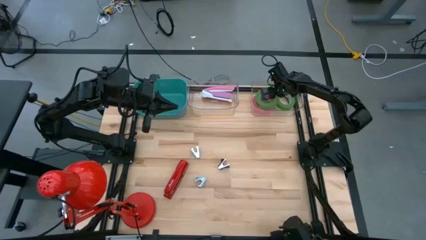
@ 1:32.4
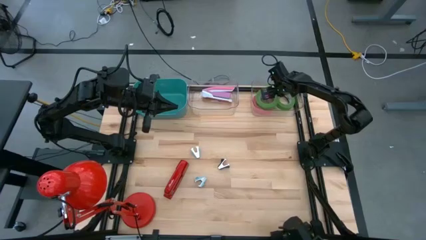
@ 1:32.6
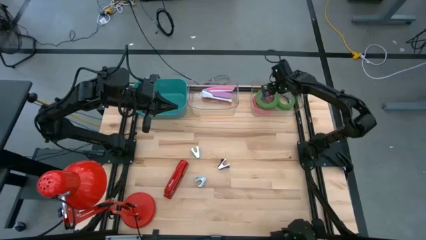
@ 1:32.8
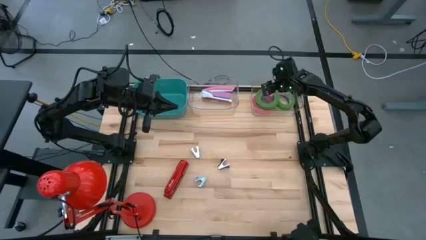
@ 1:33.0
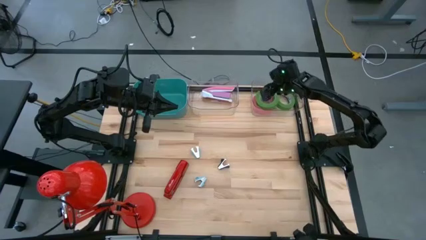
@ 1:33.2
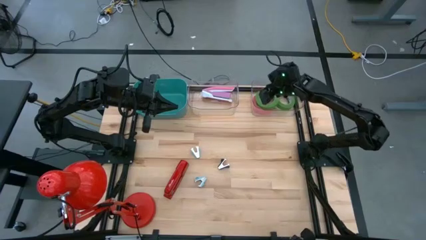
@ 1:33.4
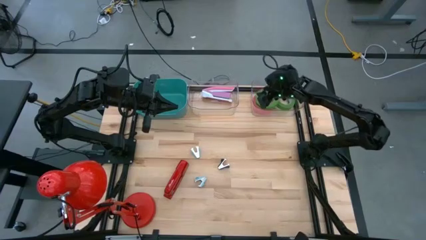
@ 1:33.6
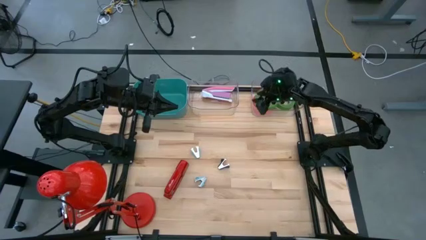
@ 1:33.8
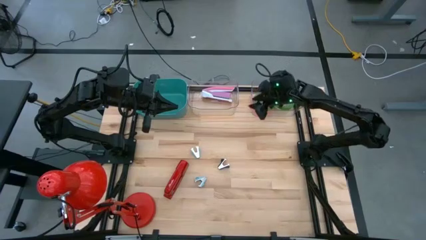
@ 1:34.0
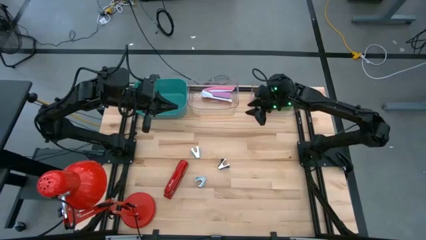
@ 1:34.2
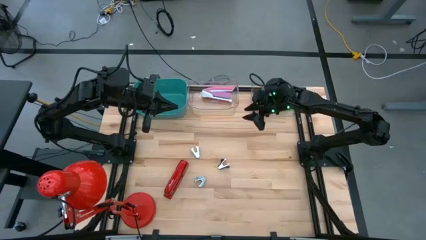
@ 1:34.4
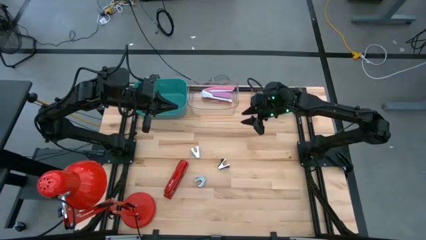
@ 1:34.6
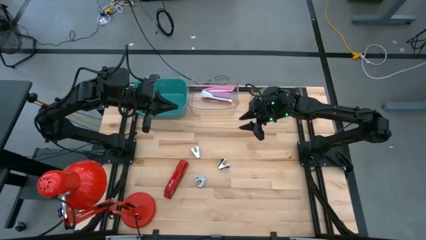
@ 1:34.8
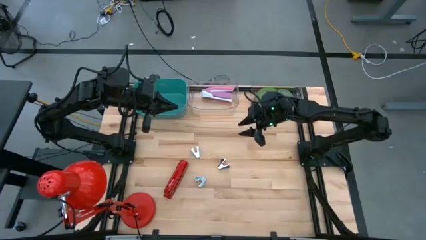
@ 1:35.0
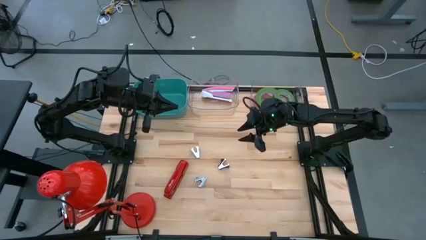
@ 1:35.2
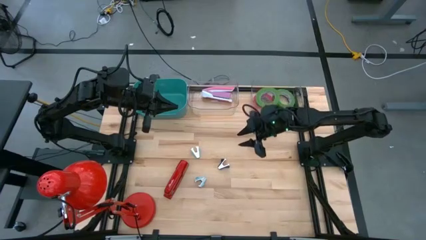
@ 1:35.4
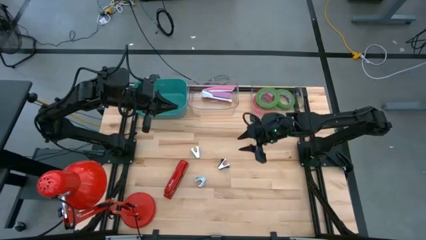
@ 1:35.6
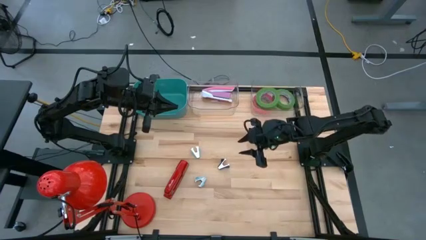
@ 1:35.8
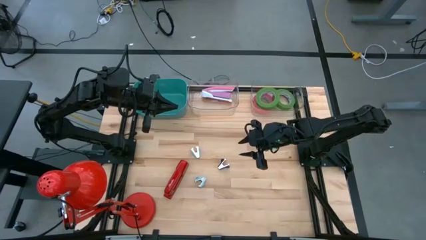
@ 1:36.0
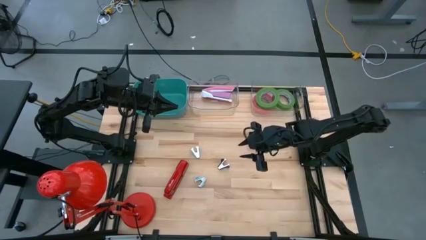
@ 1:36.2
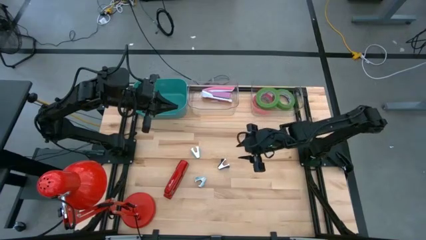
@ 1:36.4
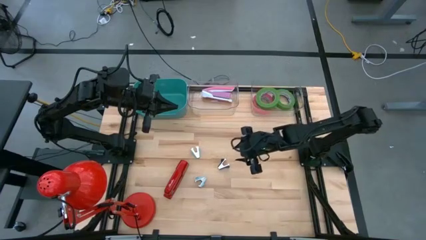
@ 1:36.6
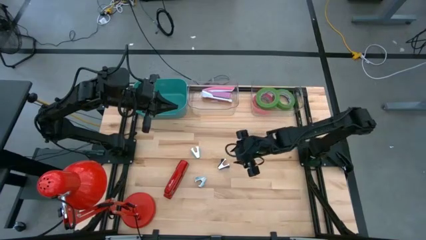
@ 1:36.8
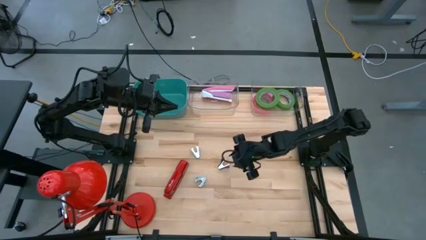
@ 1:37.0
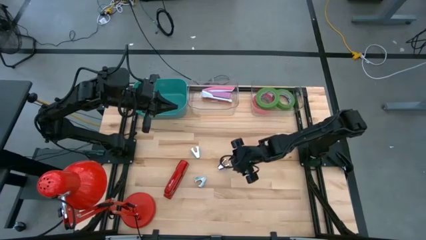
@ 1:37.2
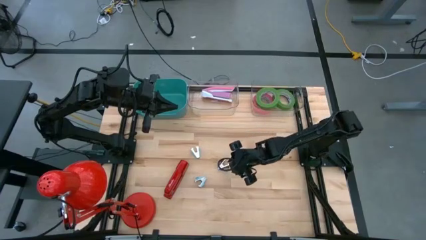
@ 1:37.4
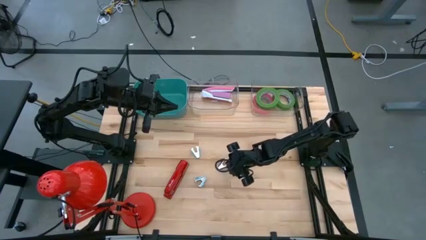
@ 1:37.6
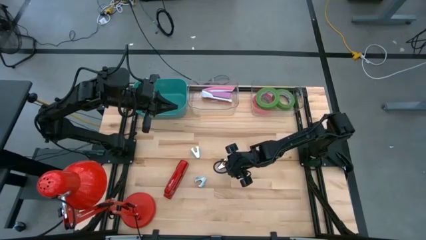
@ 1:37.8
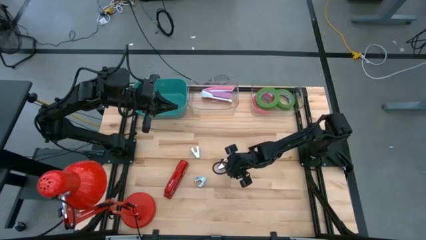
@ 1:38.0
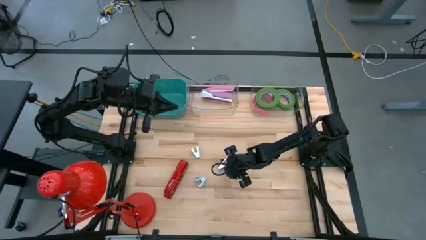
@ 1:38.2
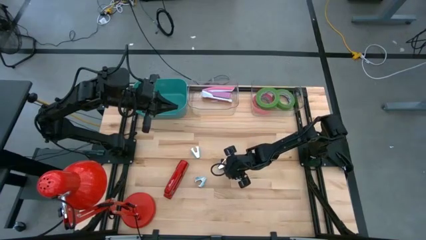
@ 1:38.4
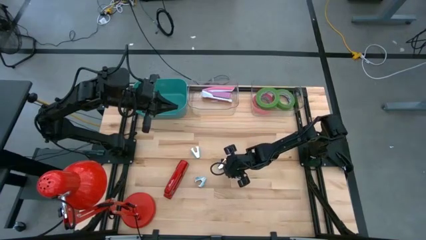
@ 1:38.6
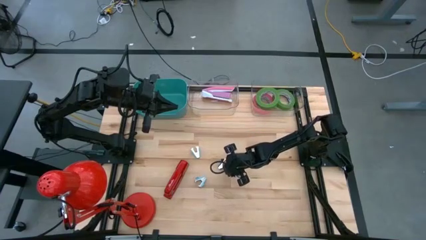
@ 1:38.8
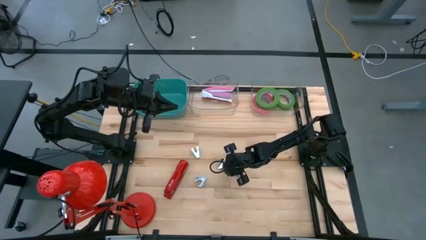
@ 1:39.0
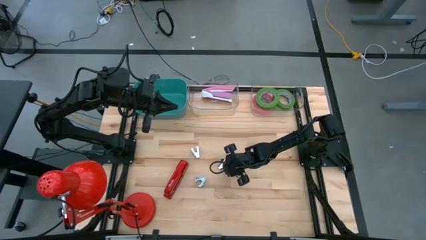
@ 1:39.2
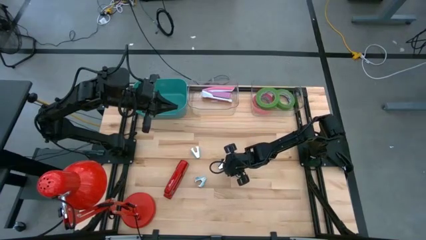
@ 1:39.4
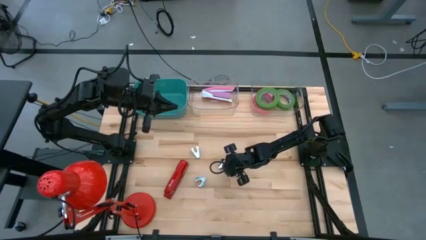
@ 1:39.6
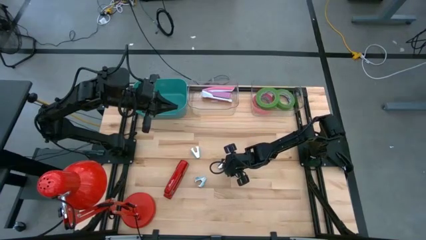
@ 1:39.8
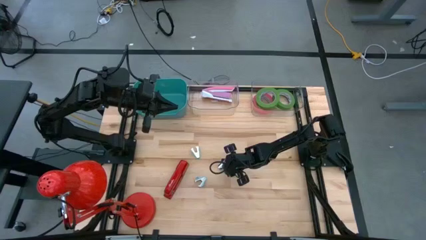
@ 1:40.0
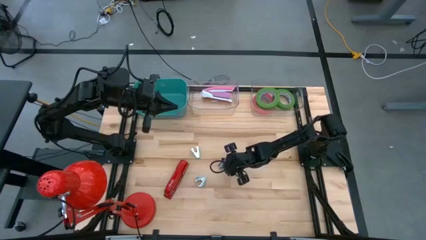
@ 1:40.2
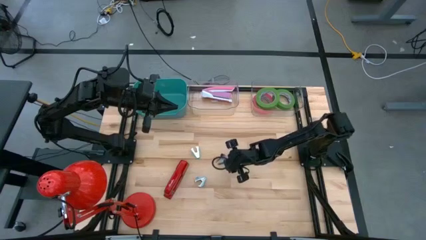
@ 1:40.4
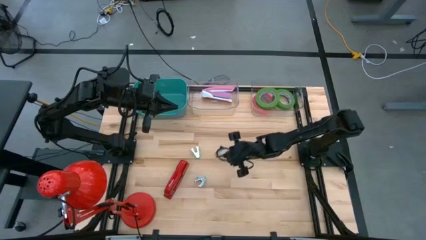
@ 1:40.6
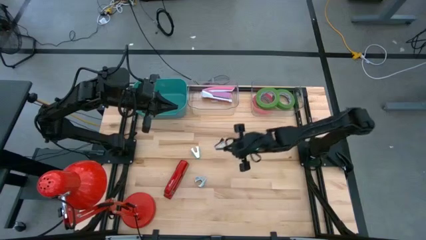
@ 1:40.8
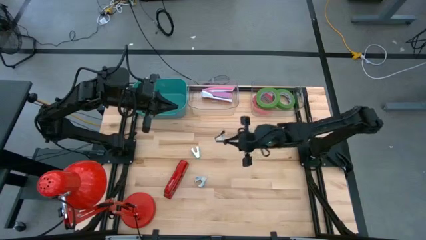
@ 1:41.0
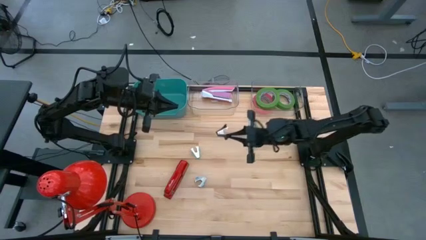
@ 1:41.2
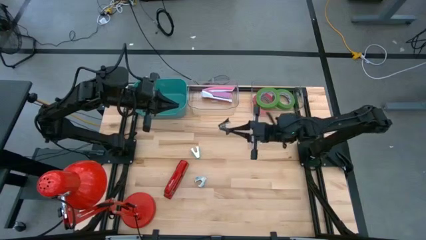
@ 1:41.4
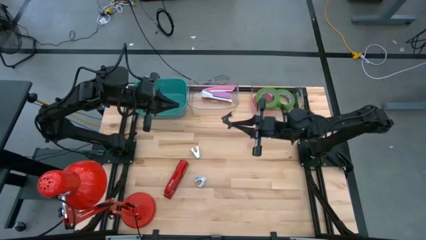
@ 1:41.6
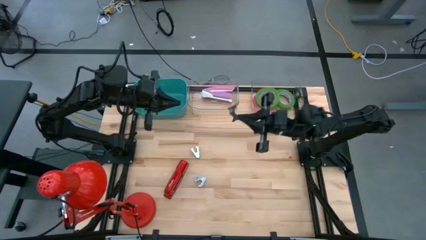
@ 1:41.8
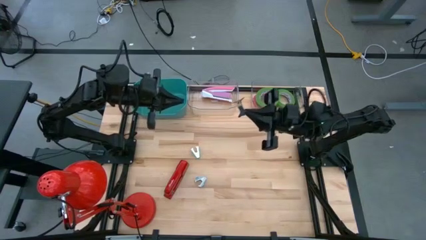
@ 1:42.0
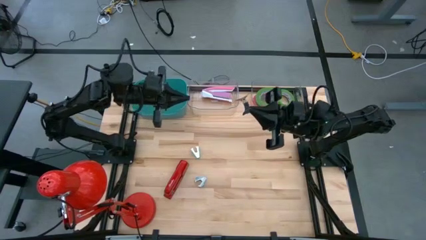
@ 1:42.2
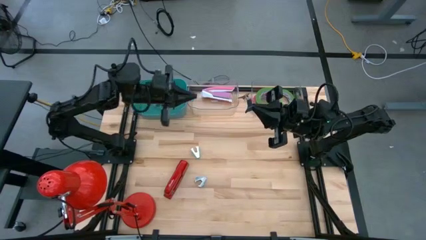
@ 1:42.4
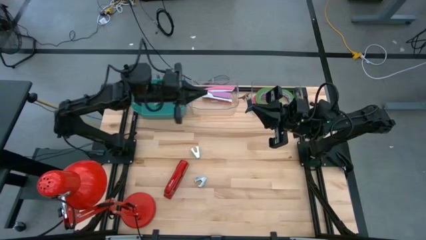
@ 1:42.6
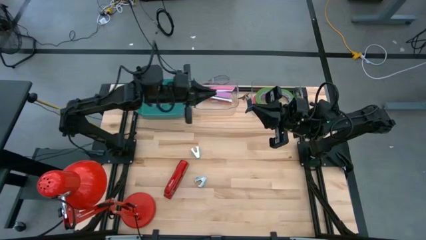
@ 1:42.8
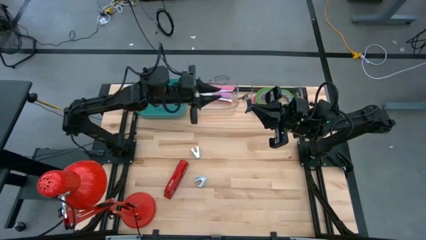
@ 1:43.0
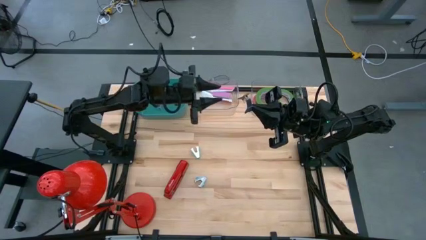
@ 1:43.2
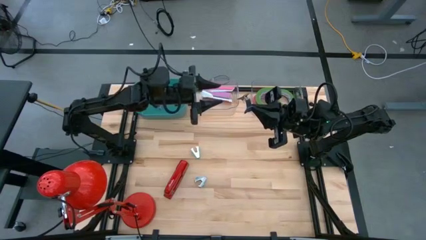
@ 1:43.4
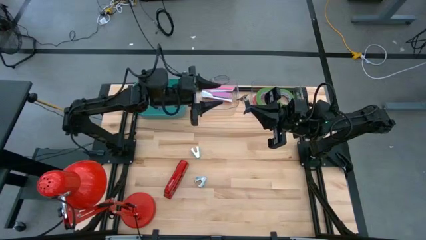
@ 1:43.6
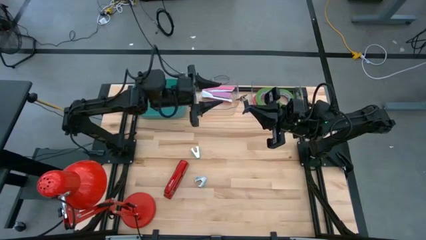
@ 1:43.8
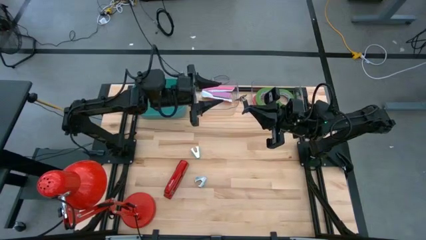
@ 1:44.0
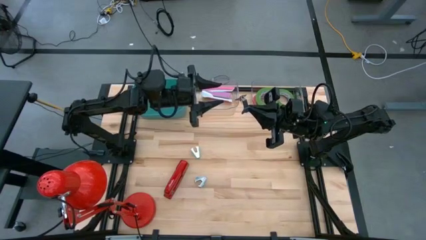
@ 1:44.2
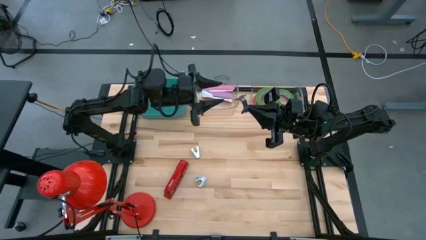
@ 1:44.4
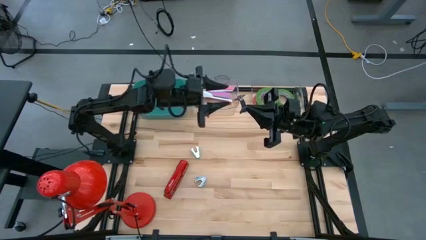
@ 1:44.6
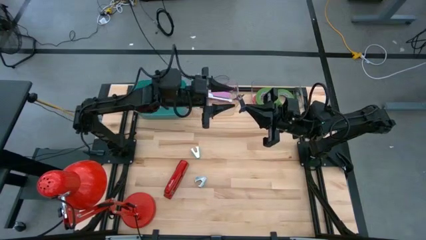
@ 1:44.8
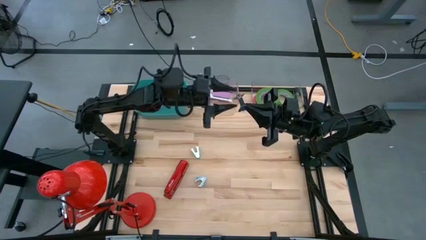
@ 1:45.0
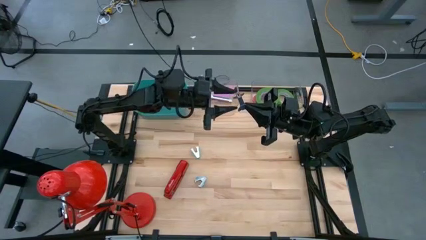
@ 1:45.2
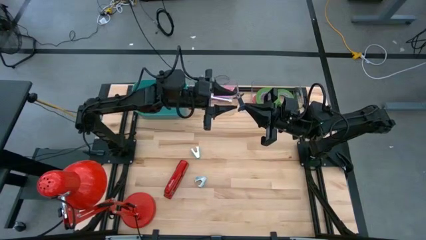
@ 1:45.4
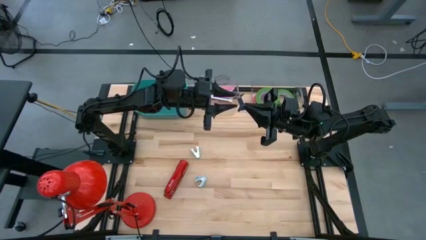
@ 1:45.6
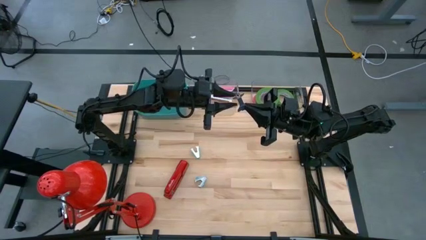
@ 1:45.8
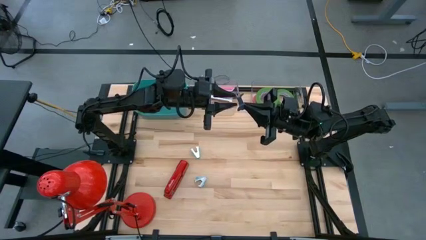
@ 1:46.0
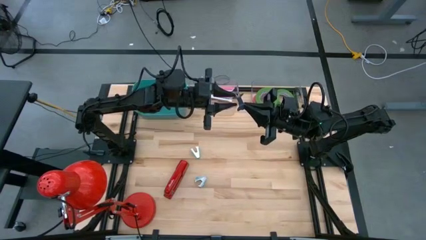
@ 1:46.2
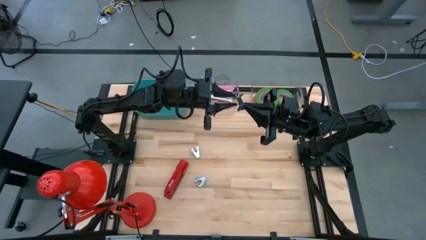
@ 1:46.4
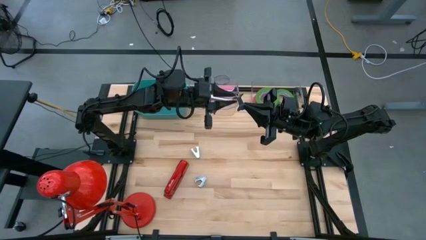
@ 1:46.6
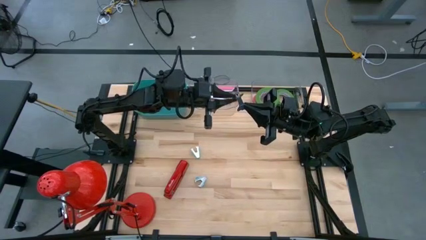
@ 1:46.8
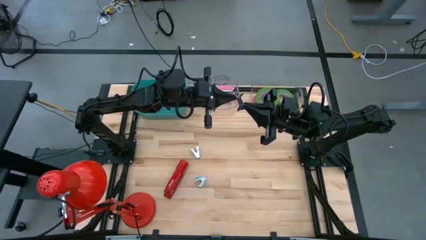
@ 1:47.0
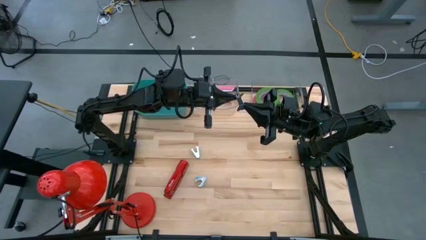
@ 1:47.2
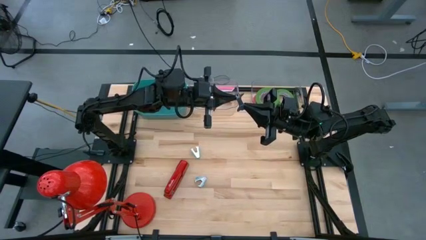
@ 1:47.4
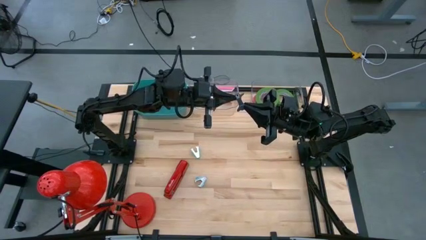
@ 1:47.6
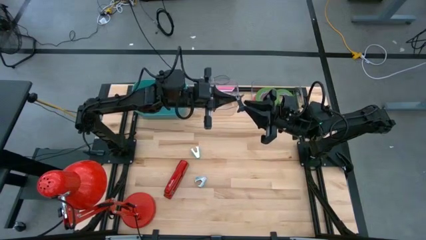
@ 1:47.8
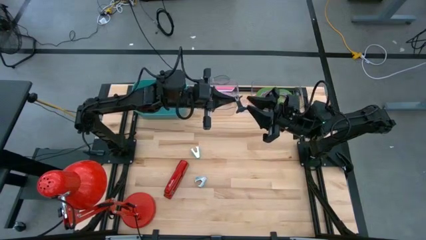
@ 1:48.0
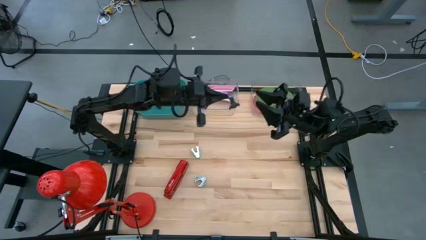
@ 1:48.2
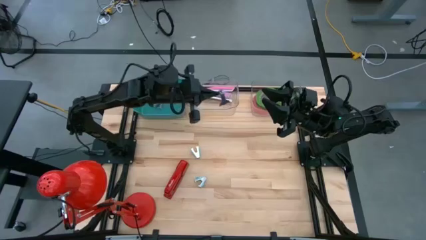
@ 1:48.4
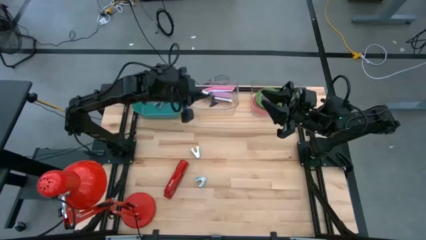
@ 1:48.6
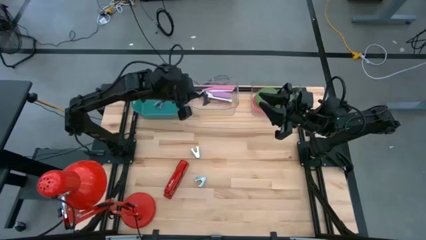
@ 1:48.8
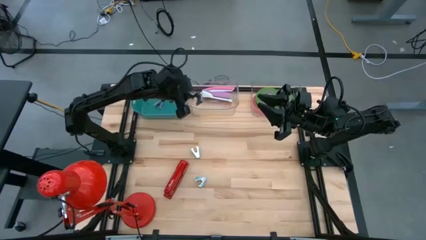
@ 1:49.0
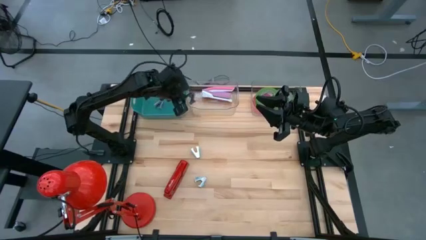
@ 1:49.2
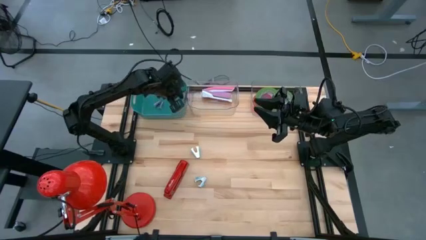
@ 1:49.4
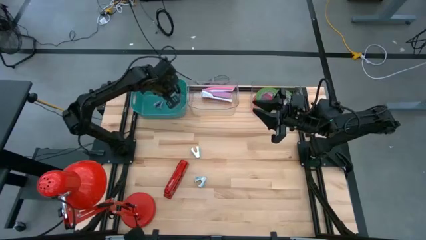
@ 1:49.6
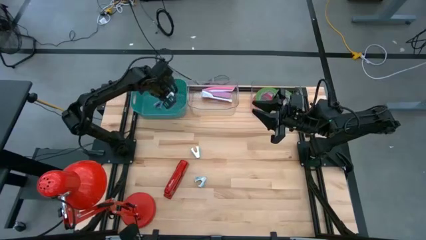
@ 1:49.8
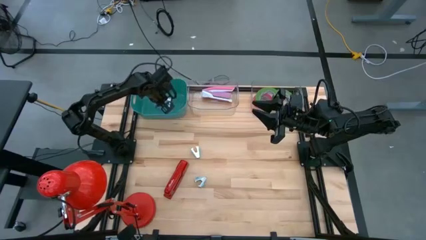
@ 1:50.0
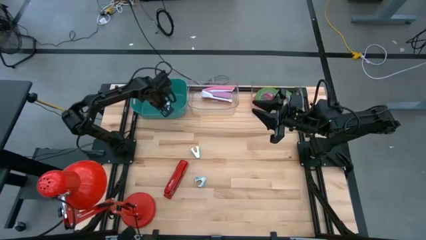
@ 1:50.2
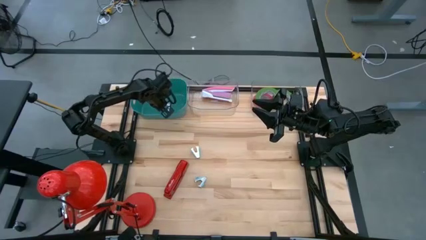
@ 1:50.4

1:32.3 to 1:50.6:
Task: Pick and place Stapler, Stapler remover, tape
Put the black staple remover into the blue bin
